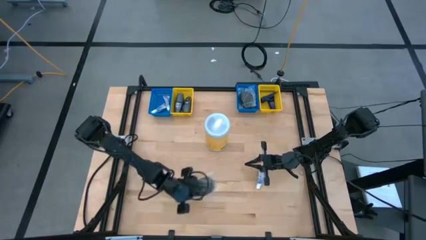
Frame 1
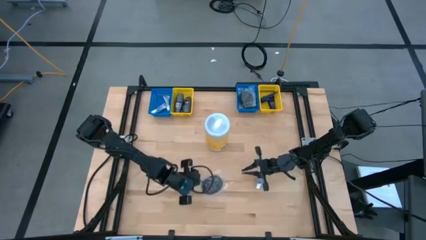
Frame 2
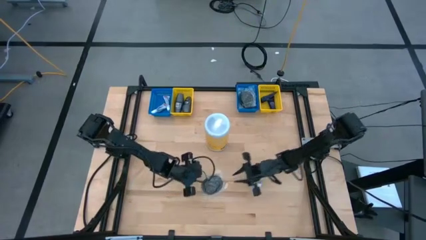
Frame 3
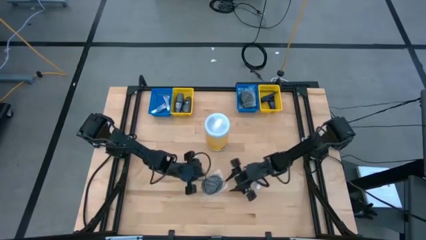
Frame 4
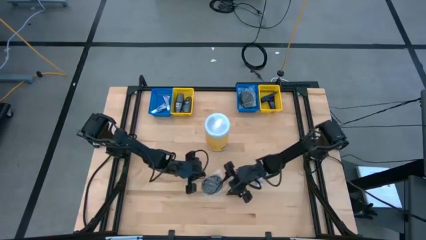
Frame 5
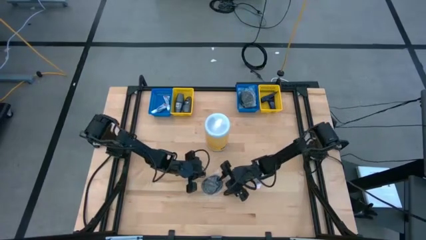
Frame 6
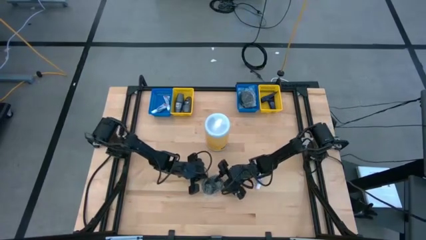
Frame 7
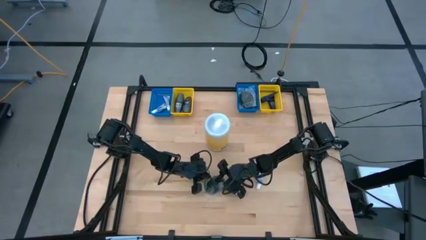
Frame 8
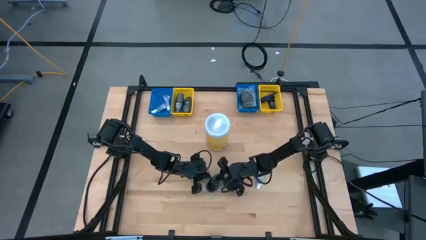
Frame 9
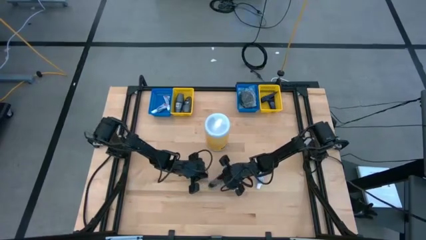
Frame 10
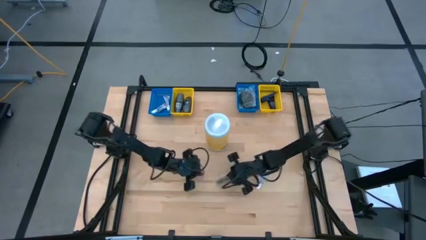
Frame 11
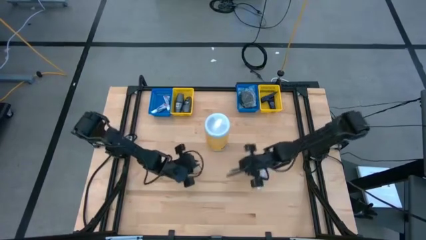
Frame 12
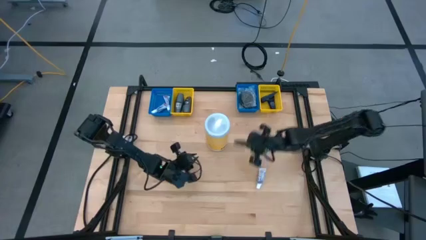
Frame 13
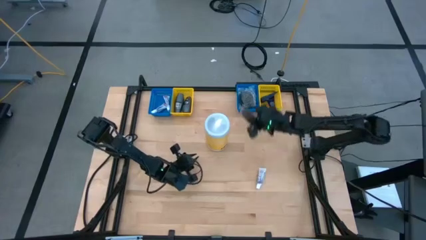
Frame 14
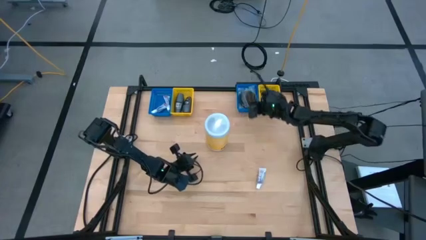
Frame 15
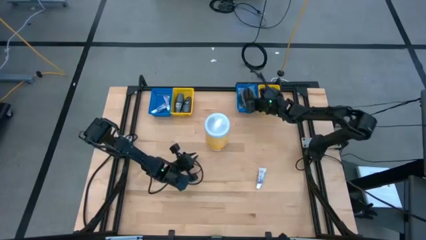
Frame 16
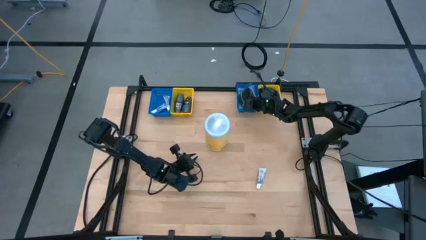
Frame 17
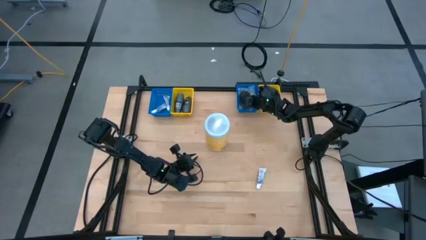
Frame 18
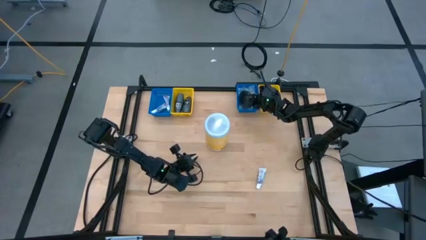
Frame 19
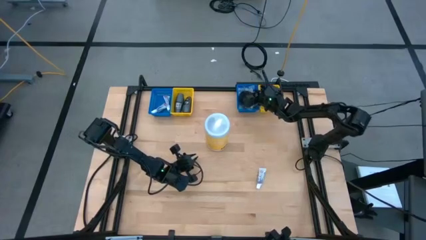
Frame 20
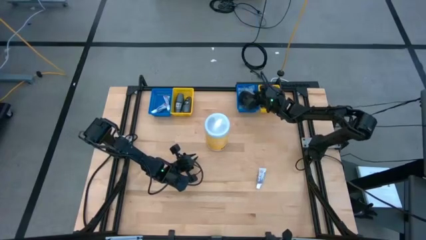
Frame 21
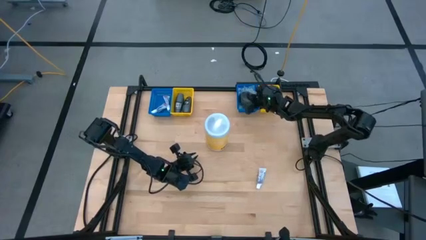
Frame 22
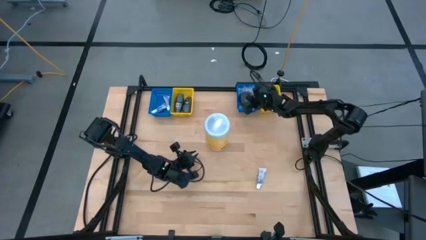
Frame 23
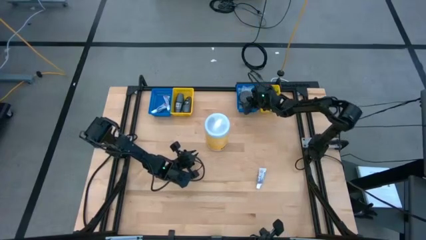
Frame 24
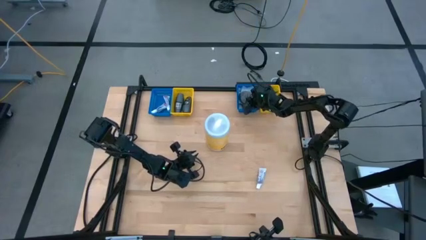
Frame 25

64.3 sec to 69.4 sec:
Task: Pick & Place Travel size toiletries
Put the hairbrush into the right blue bin

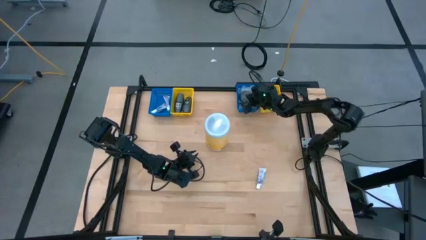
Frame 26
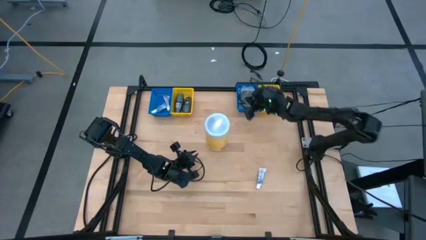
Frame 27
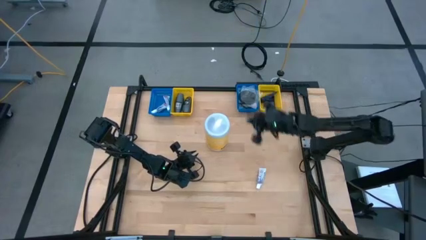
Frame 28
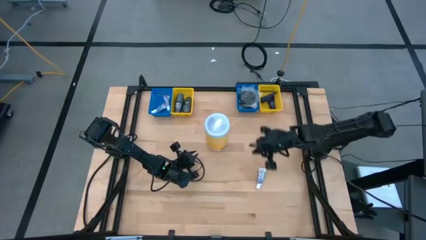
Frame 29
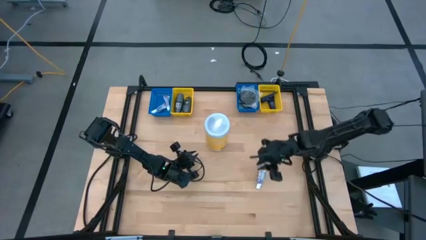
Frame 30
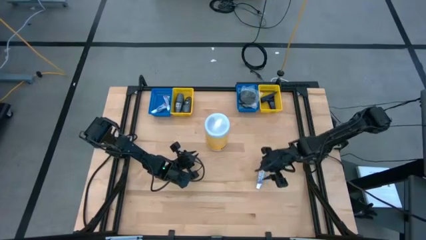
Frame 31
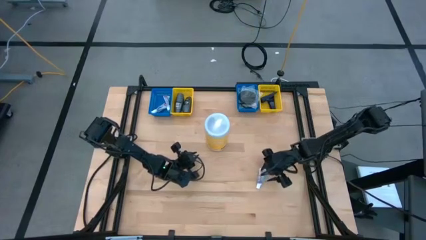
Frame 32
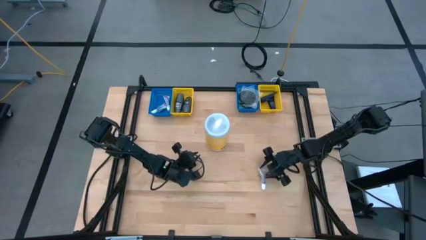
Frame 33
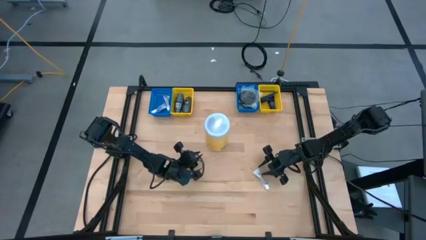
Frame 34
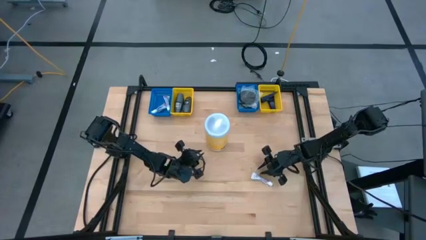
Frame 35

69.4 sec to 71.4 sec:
Put the toothpaste into the left blue bin

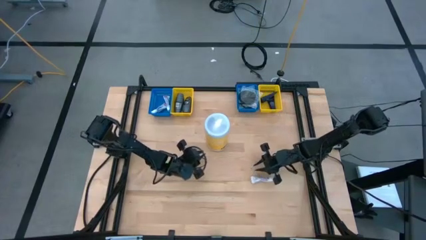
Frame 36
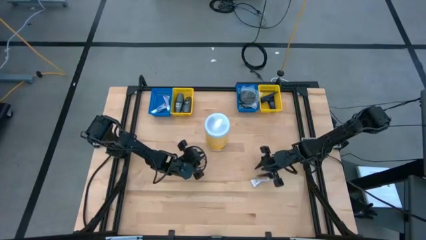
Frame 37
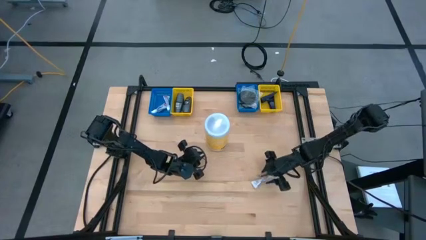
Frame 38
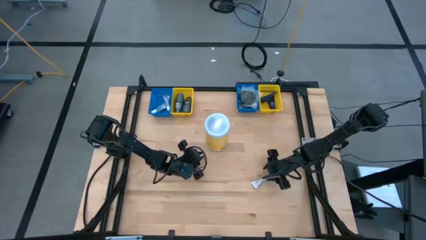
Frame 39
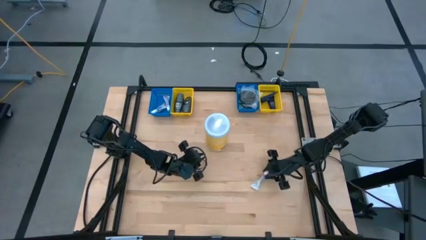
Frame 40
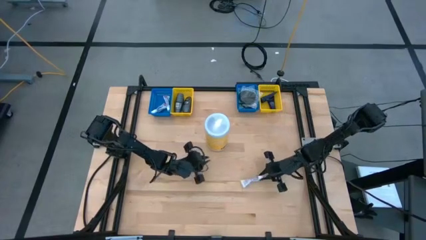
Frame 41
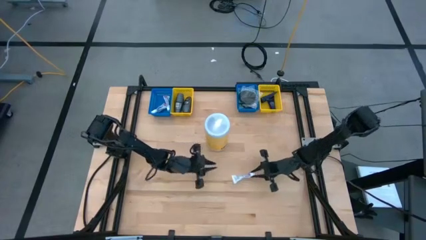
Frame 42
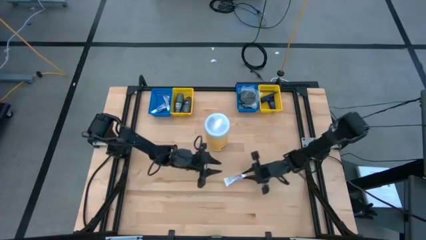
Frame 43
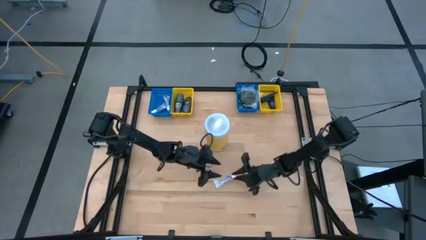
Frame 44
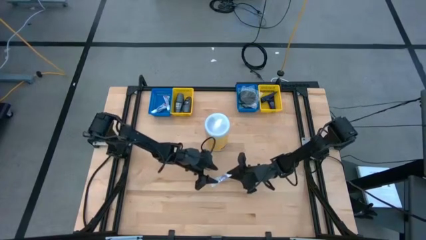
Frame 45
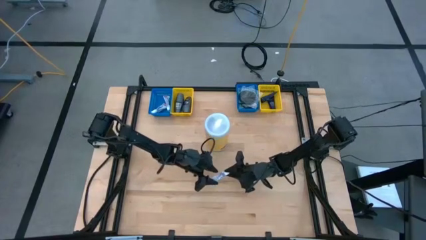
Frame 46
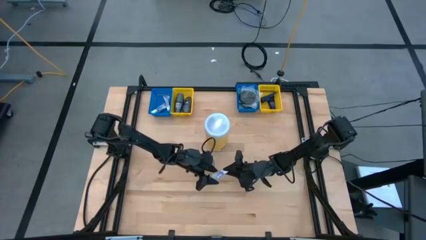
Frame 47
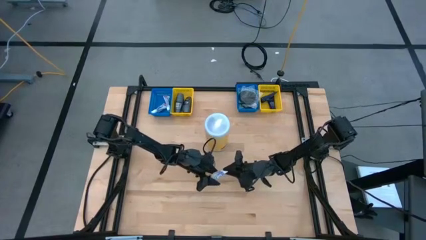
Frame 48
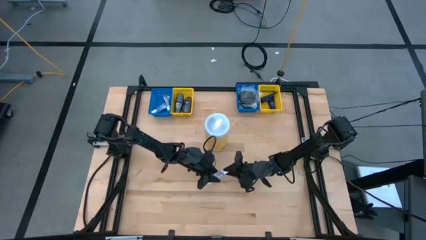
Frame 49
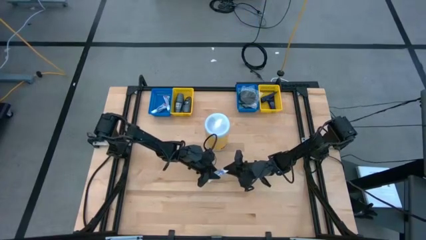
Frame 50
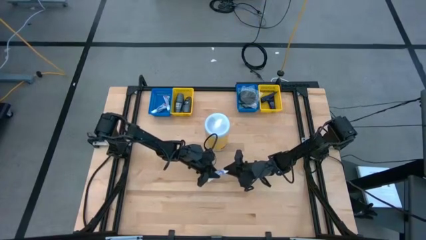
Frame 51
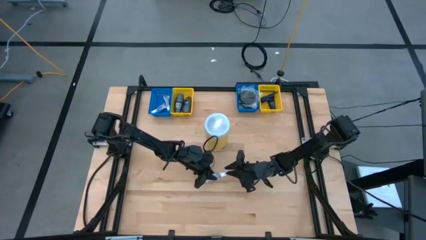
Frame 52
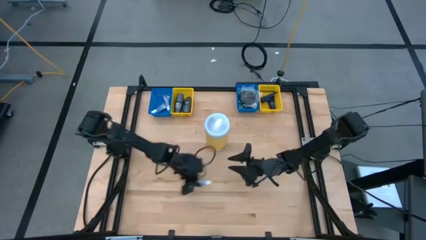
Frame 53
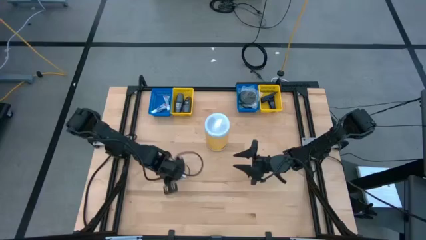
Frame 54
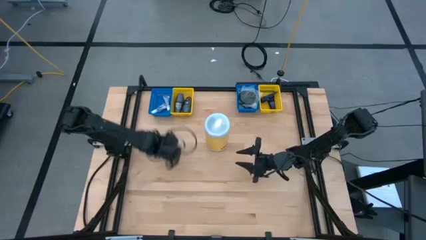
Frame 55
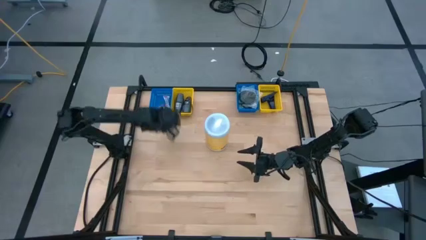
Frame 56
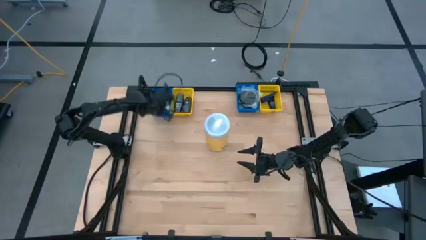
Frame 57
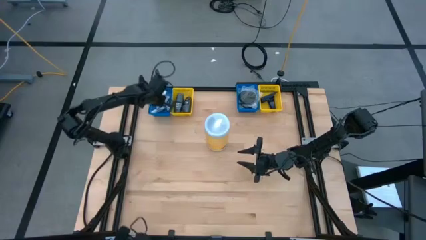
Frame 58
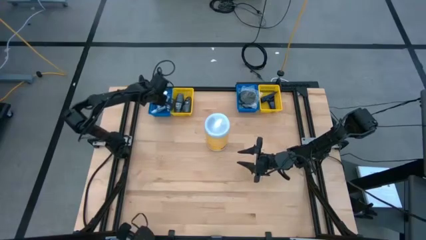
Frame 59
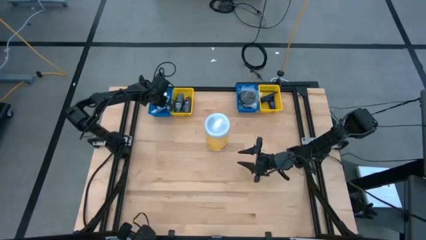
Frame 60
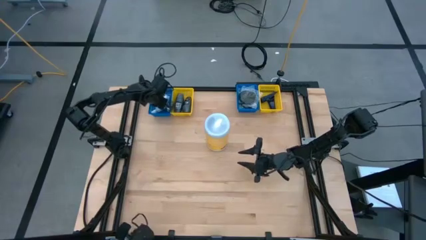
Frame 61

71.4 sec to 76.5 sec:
Put the toothpaste into the left blue bin

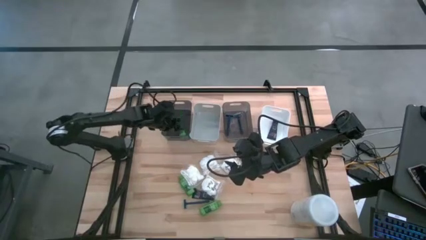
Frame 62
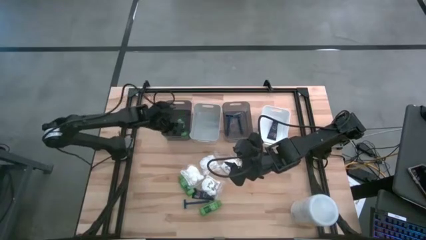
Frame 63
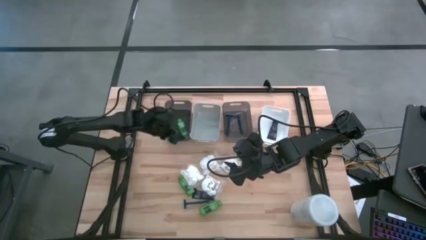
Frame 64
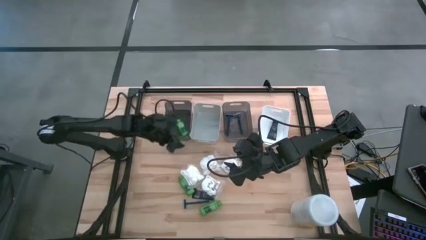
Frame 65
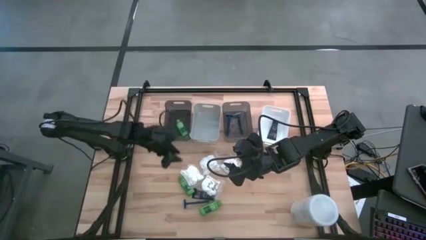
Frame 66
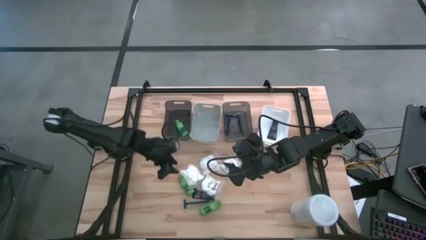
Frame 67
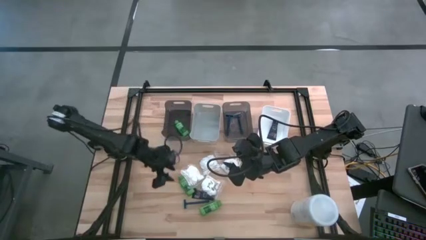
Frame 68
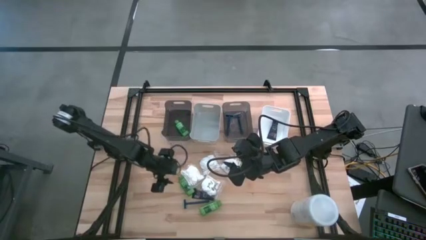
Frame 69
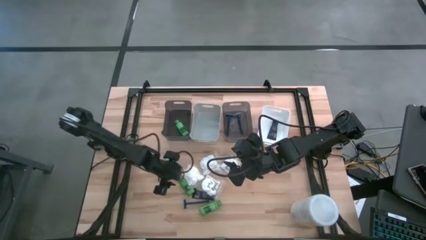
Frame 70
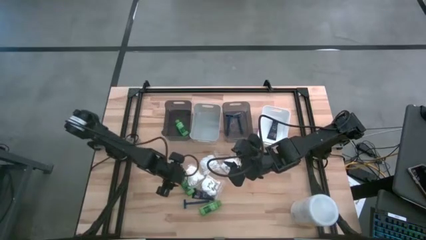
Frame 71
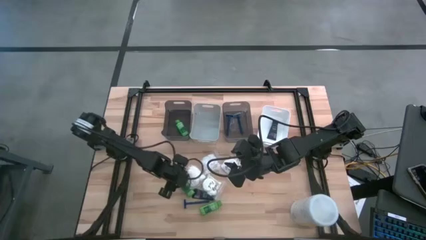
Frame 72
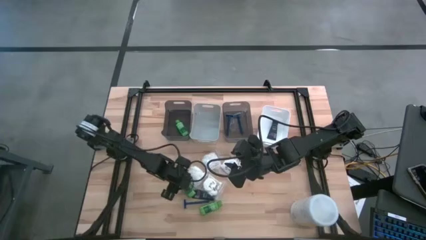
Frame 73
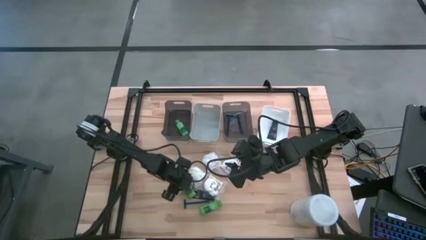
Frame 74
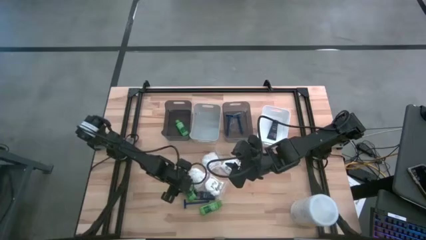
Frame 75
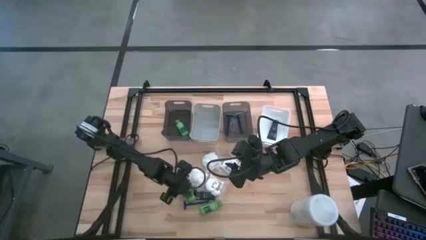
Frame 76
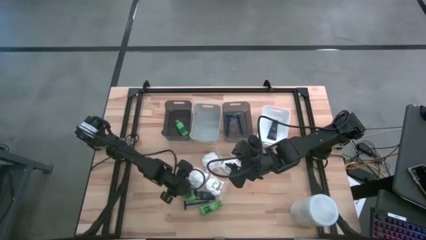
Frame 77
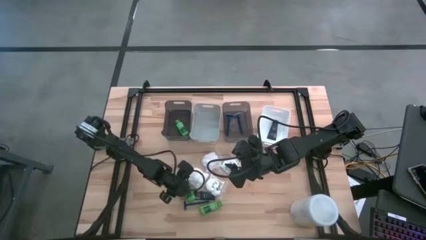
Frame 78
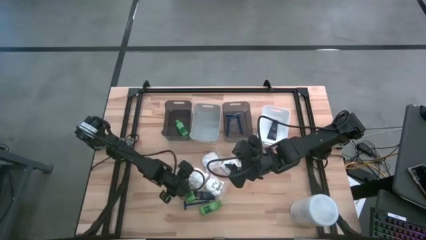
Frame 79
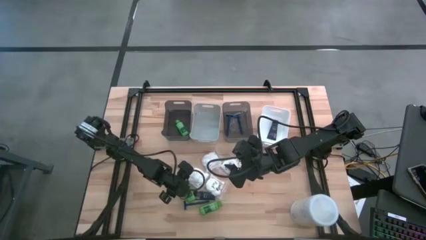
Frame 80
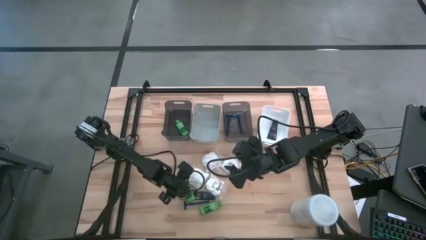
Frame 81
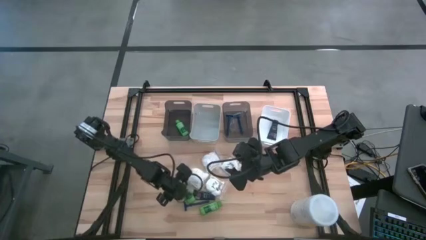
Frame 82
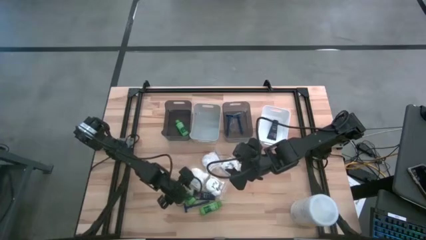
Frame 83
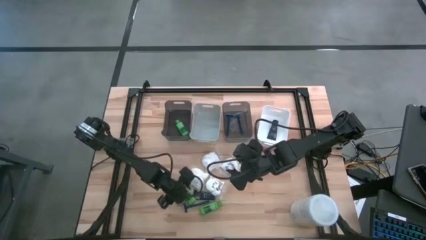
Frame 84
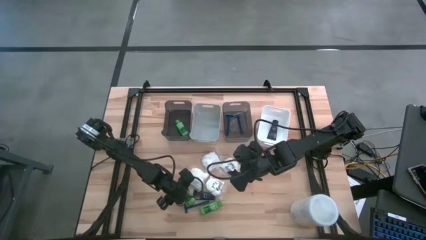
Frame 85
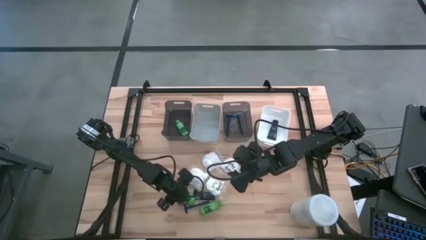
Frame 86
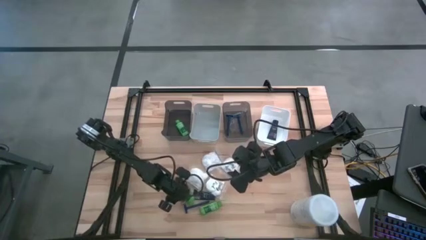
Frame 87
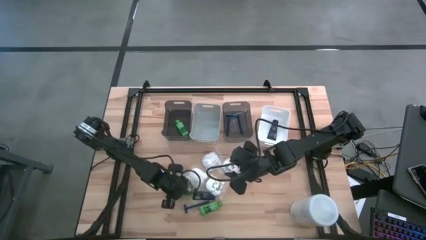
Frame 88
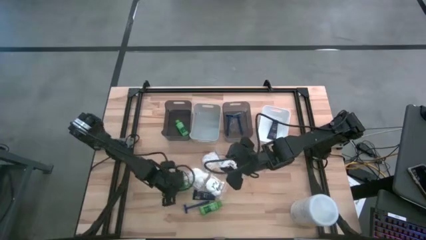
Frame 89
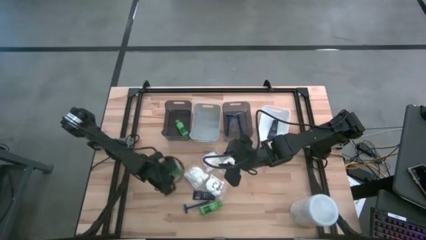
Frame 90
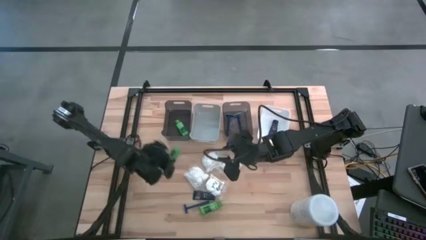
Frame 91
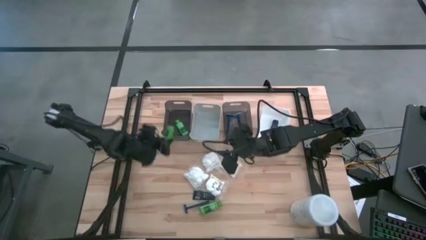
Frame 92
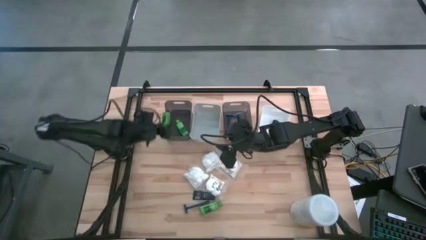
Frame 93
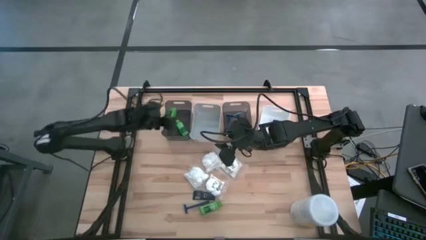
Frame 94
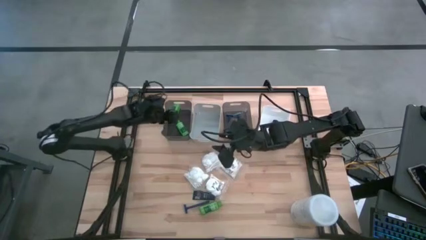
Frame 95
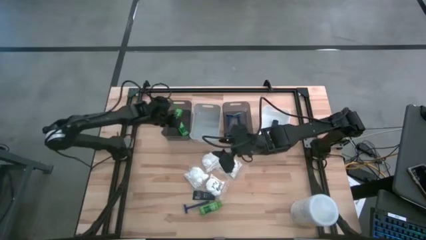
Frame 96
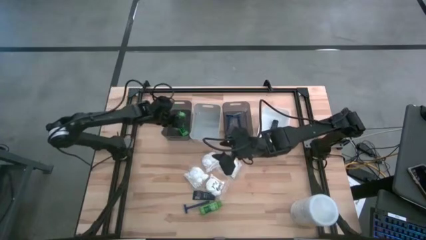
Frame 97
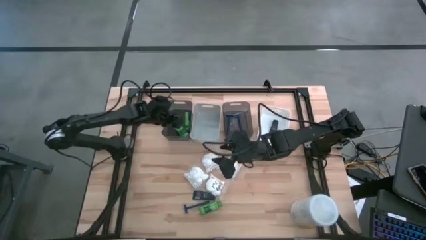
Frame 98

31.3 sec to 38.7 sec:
Task: Pick & Place Travel size toiletries
Put the green shampoo into the left black bin
